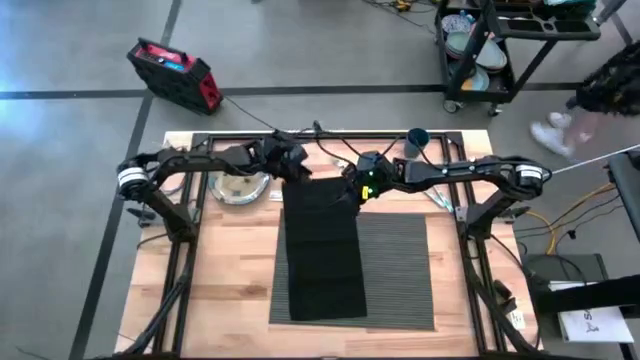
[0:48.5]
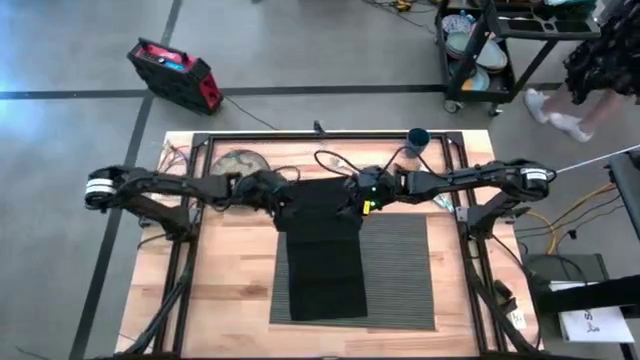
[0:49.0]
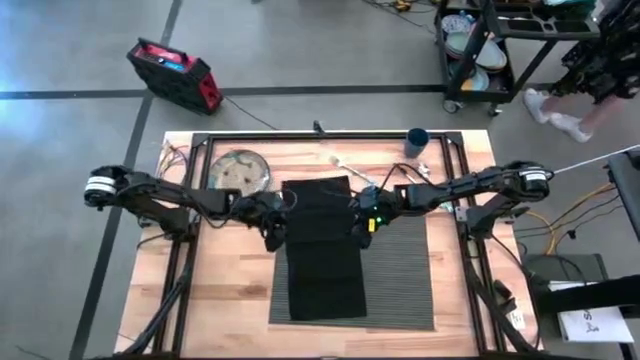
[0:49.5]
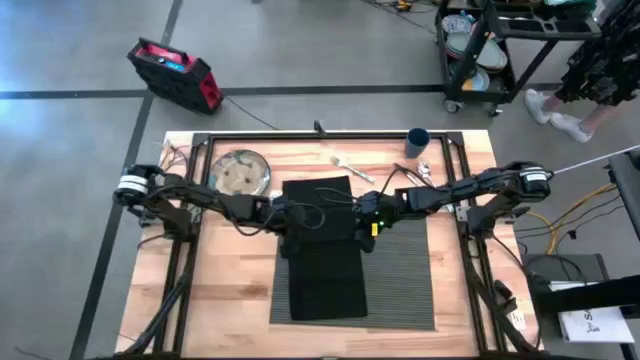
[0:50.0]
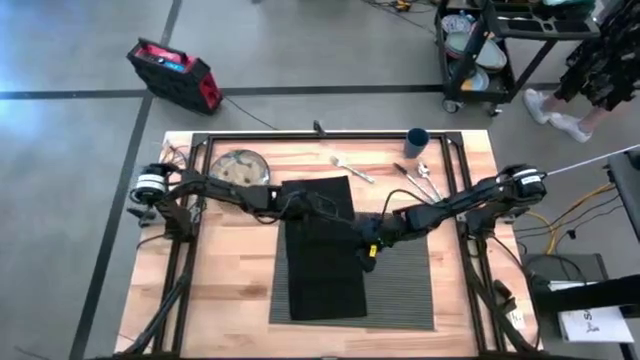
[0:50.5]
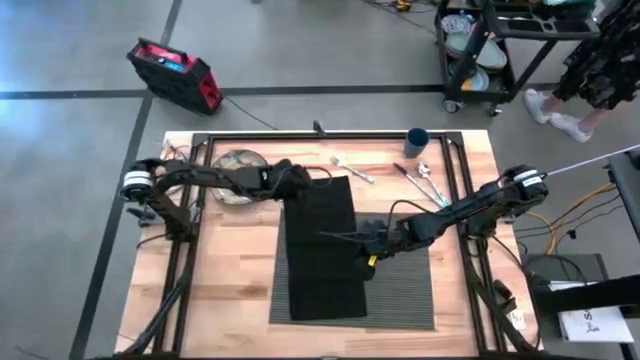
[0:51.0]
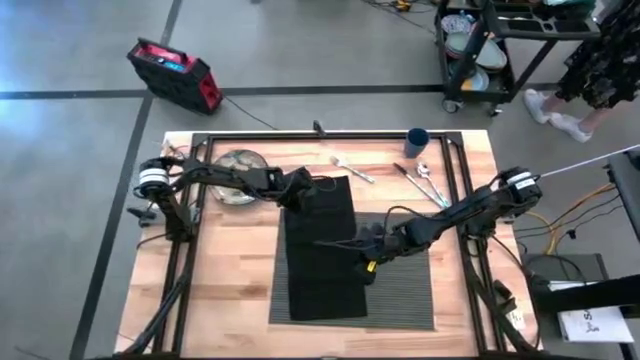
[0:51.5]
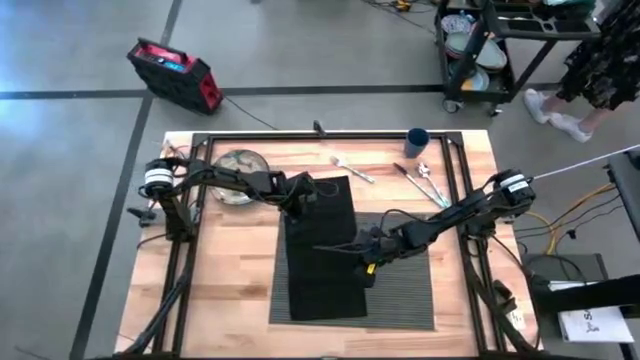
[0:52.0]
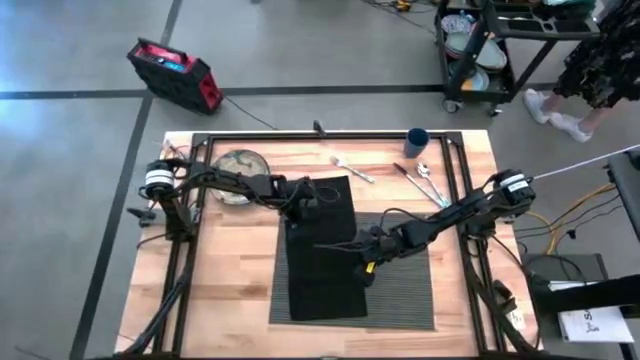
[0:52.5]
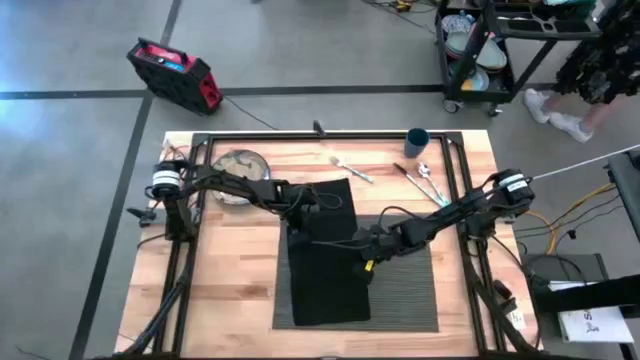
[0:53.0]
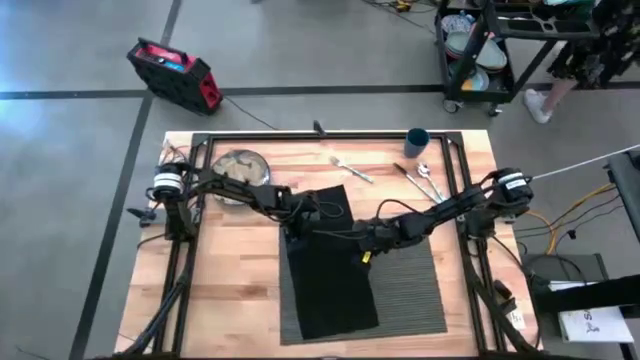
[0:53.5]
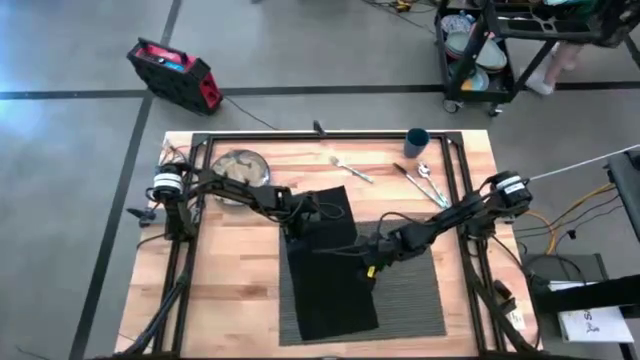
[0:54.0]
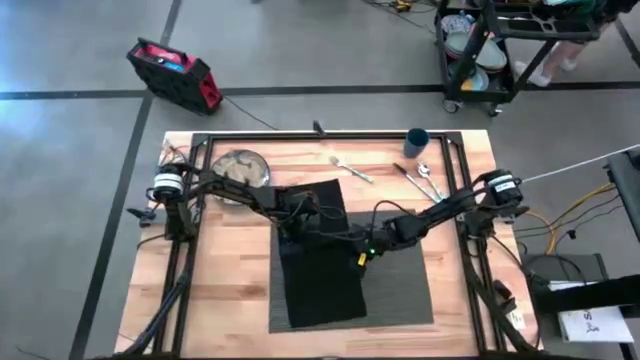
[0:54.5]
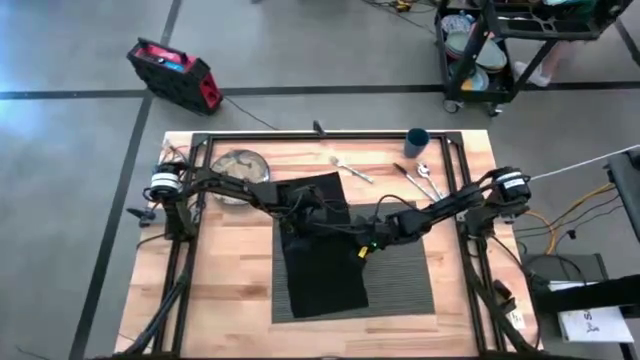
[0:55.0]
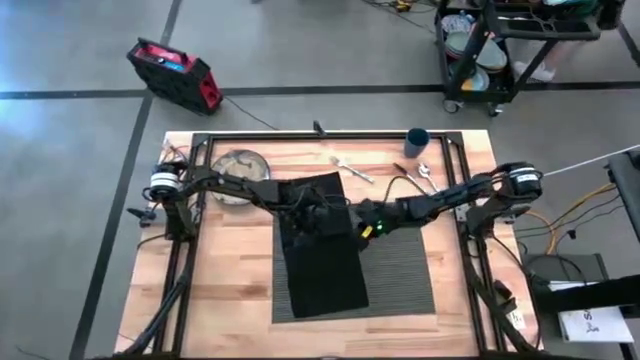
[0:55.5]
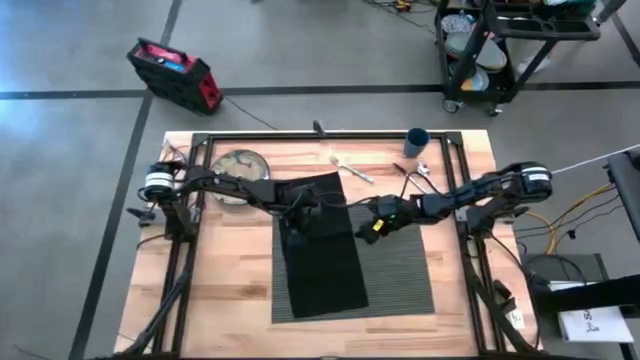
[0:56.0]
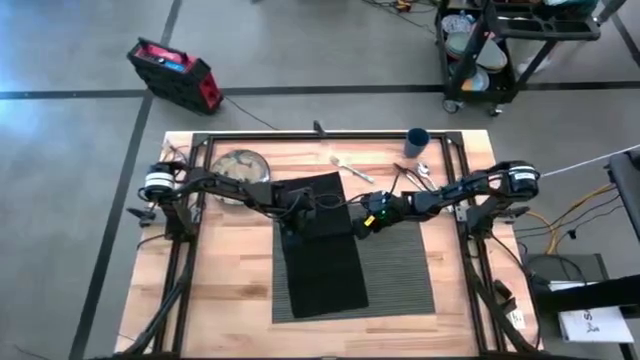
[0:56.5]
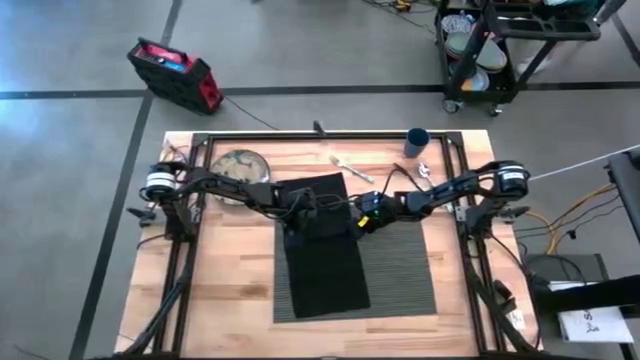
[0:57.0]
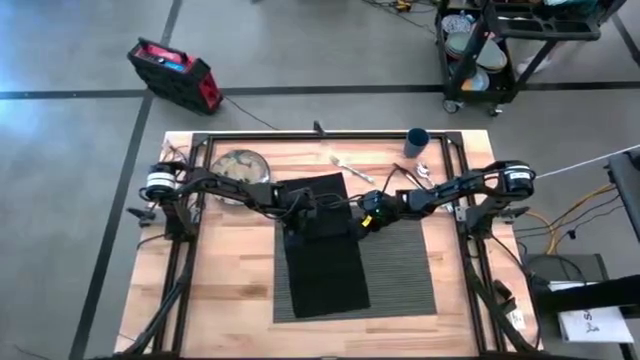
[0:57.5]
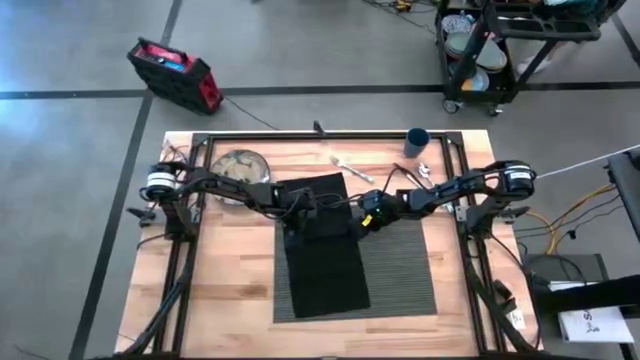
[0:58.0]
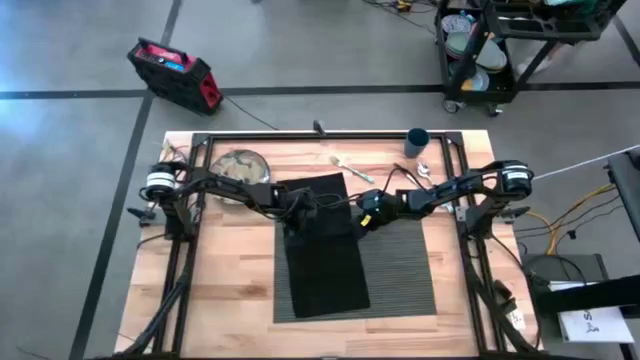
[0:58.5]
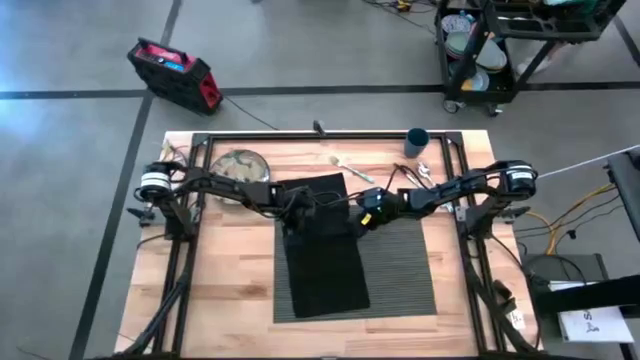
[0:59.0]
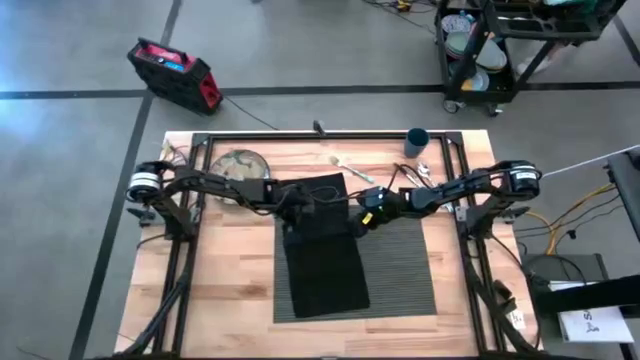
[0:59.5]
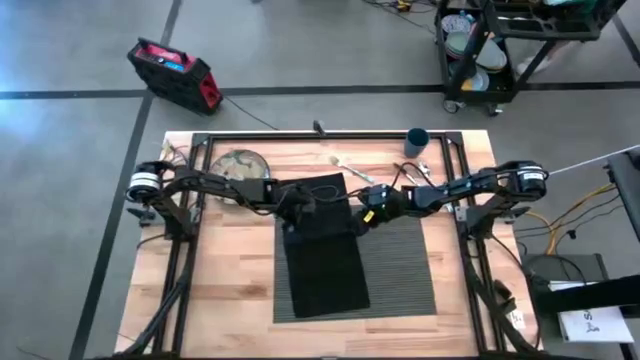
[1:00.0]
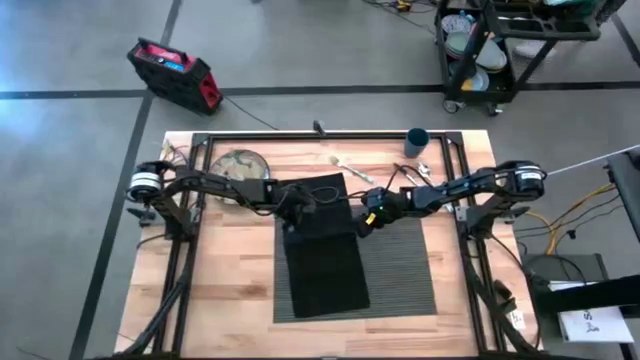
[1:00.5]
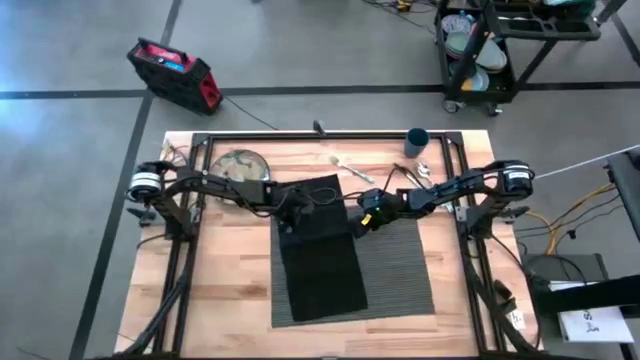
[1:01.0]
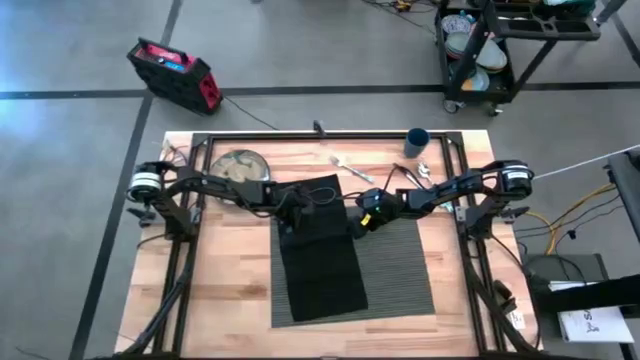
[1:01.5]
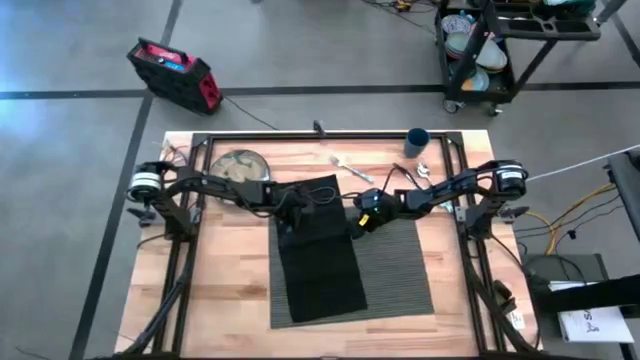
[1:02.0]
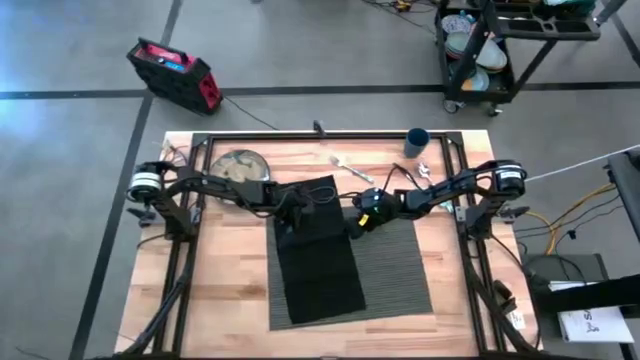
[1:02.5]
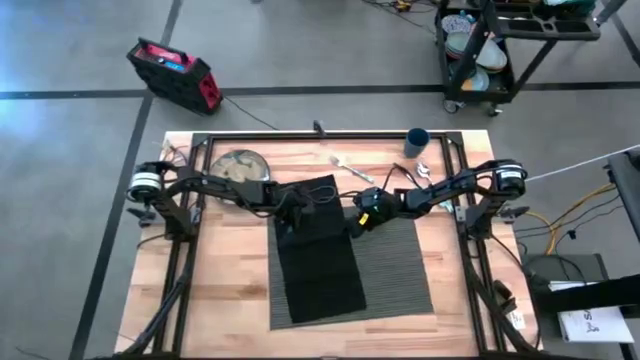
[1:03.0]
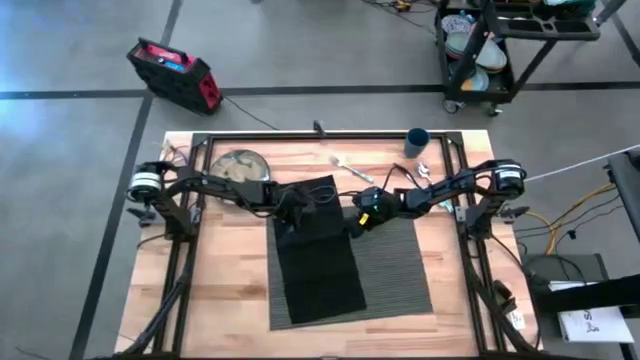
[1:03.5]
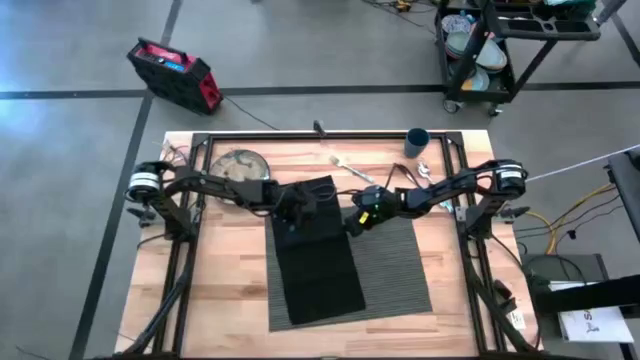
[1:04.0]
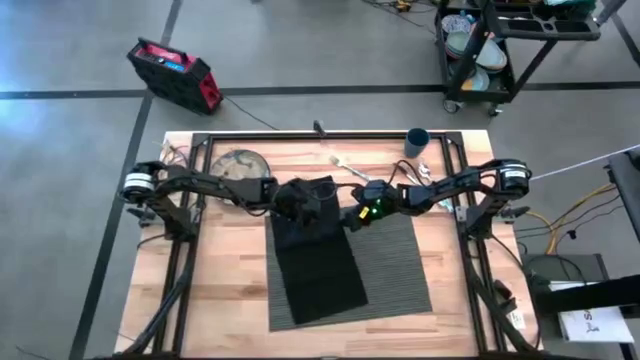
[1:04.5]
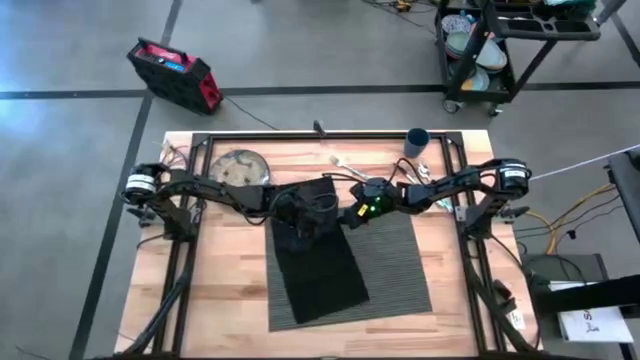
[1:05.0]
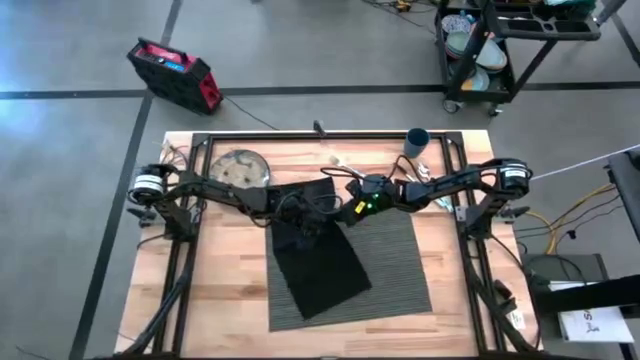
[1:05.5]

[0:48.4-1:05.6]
Task: Set table place
Fold the black napkin

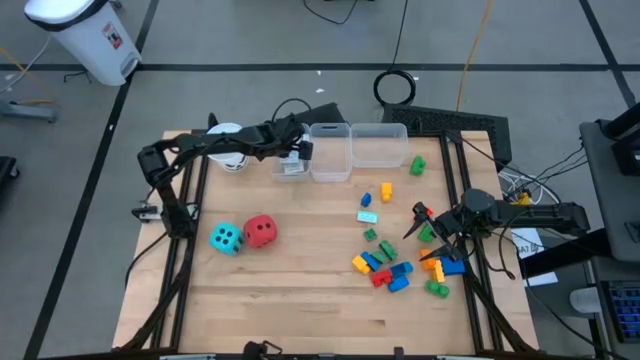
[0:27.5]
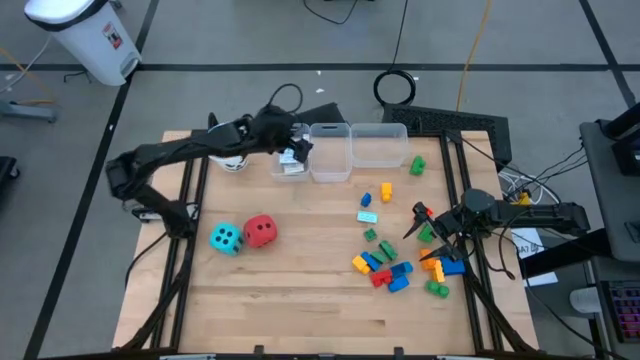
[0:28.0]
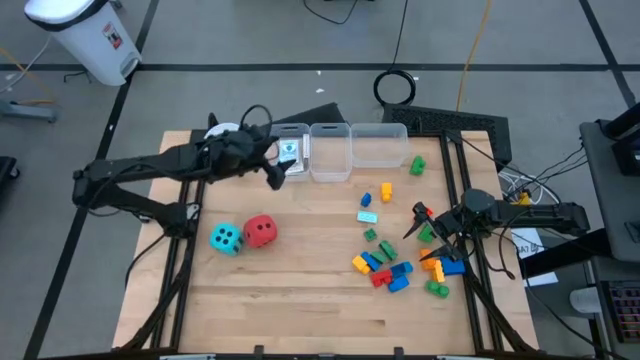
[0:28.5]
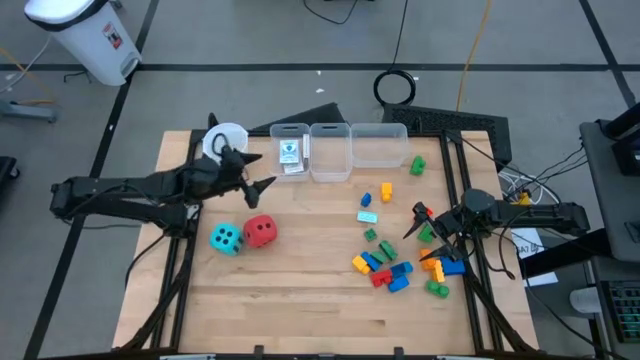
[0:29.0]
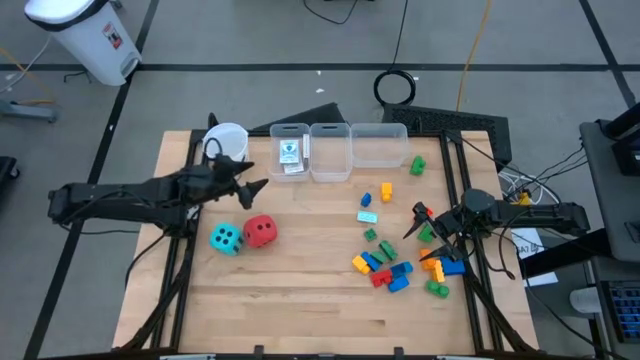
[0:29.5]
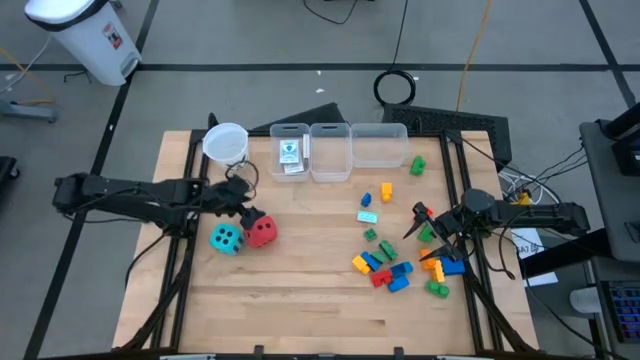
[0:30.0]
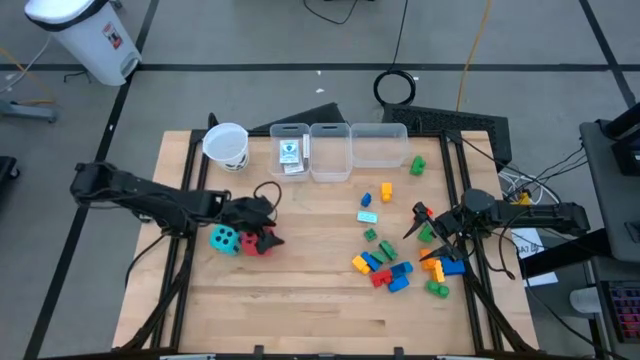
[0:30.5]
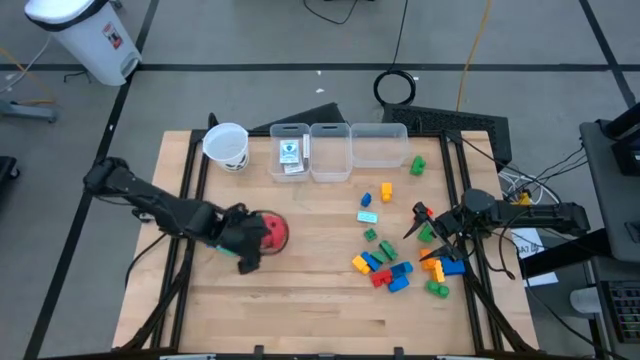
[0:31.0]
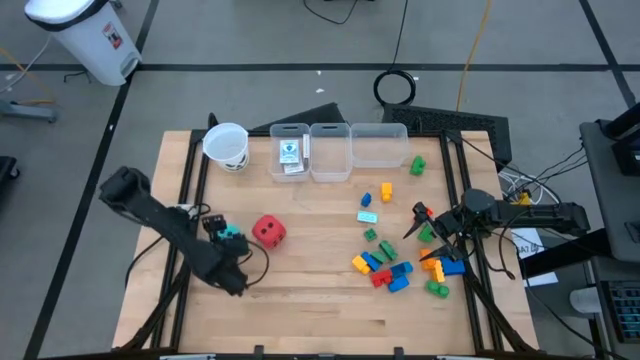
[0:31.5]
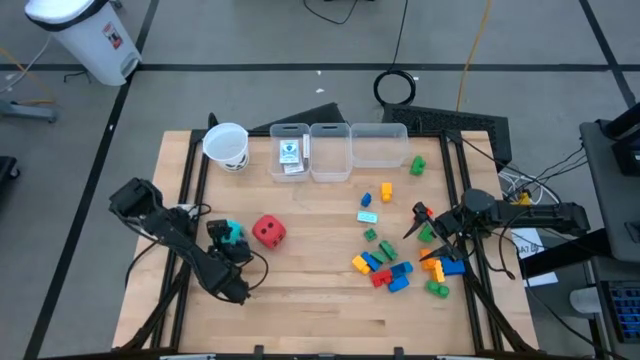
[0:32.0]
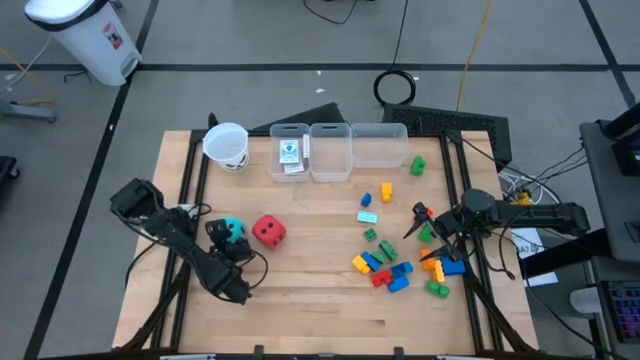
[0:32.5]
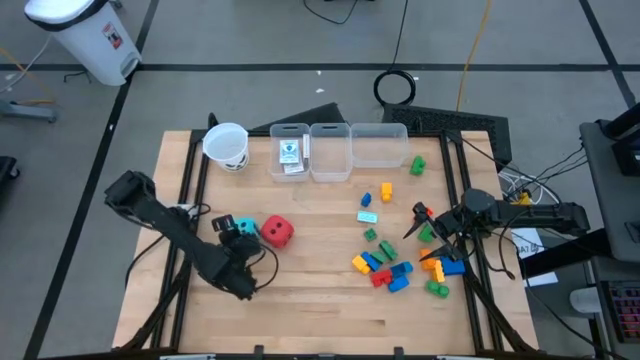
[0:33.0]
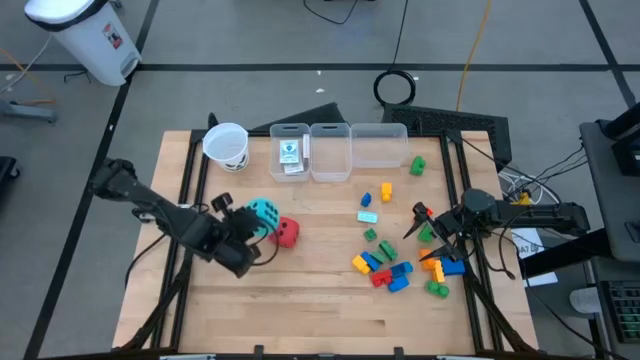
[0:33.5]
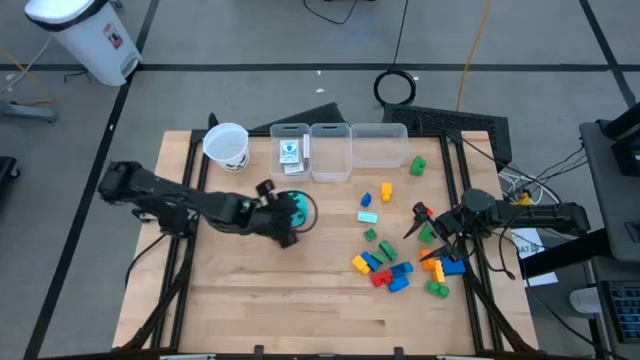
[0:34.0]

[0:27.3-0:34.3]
Task: Pick & Place Toys
Put the light blue dice into the middle transparent bin
